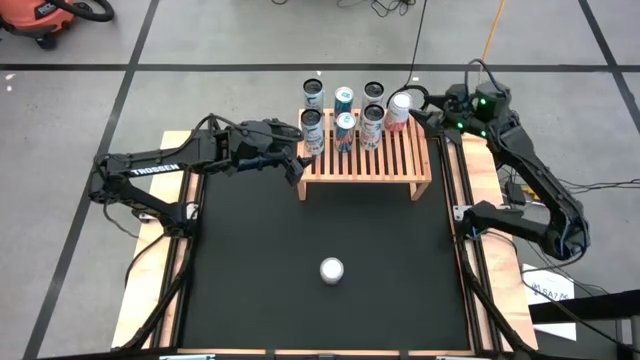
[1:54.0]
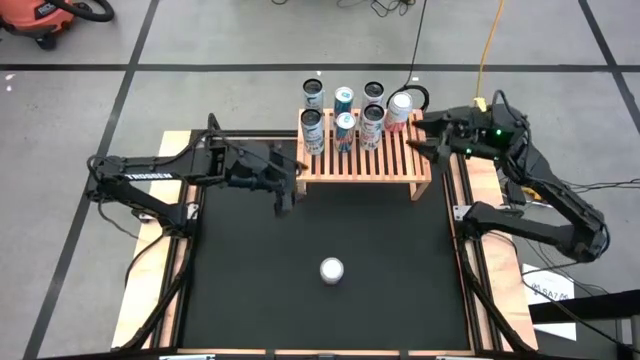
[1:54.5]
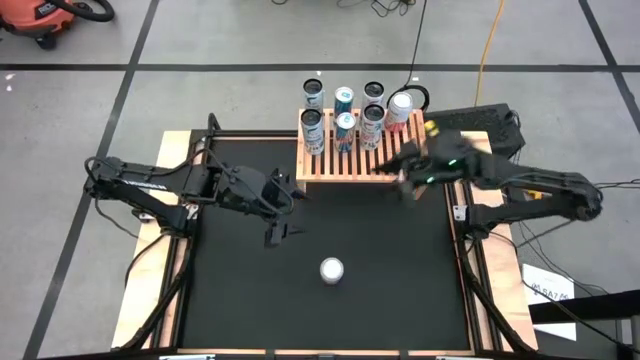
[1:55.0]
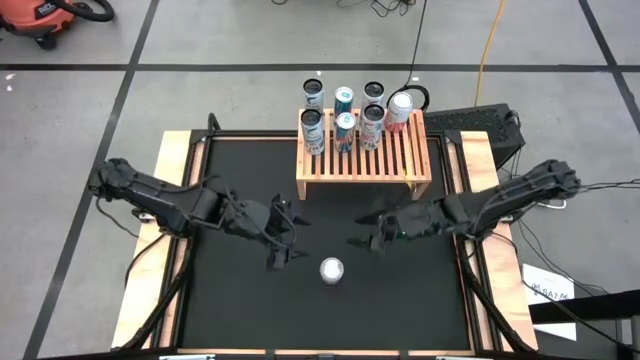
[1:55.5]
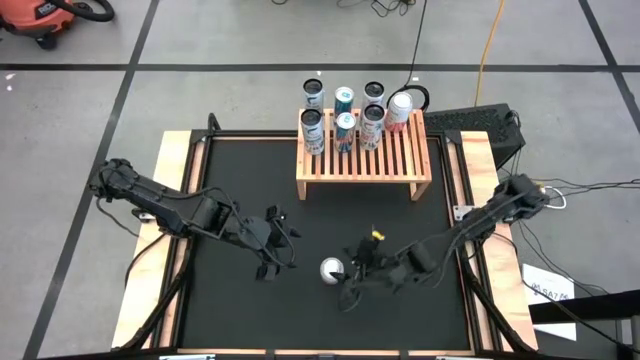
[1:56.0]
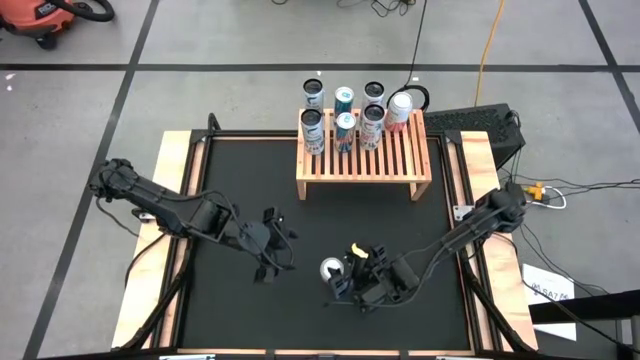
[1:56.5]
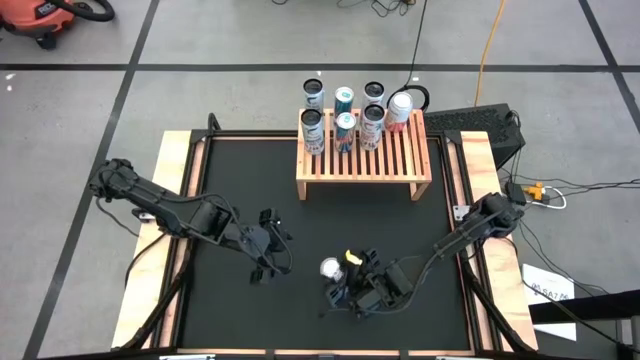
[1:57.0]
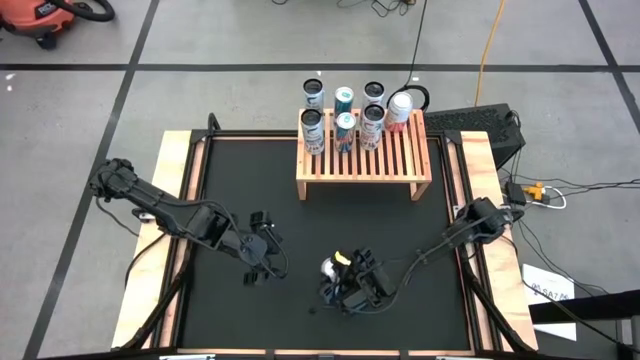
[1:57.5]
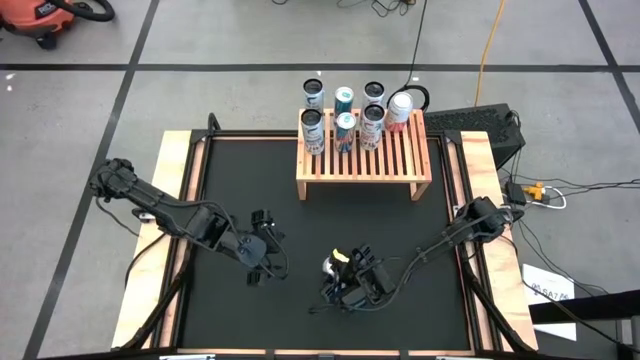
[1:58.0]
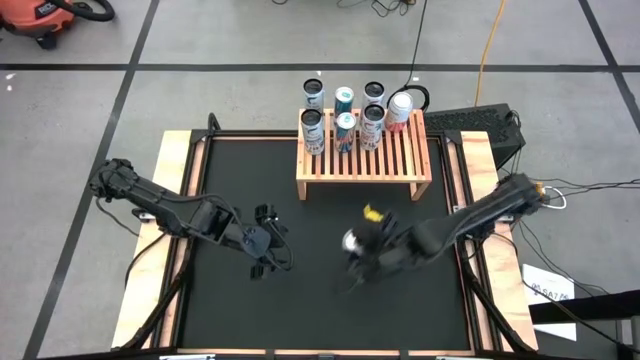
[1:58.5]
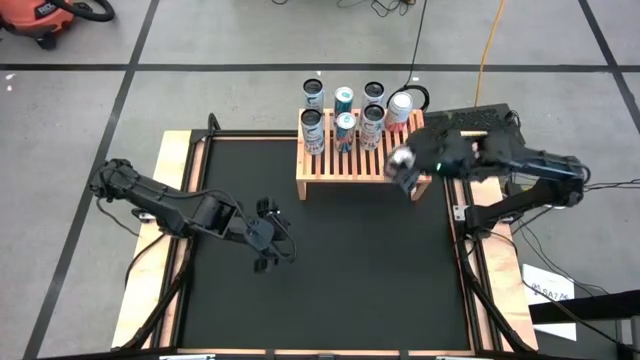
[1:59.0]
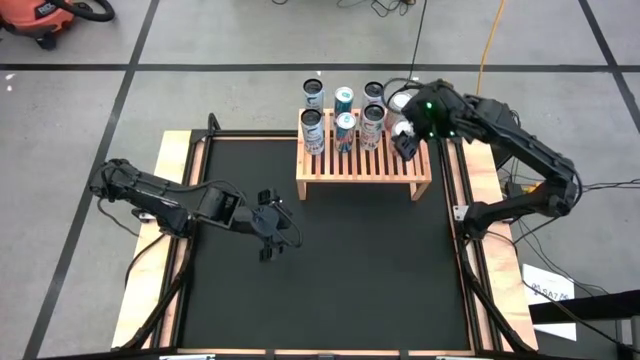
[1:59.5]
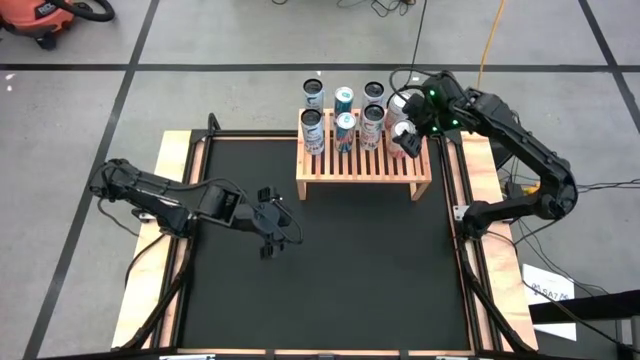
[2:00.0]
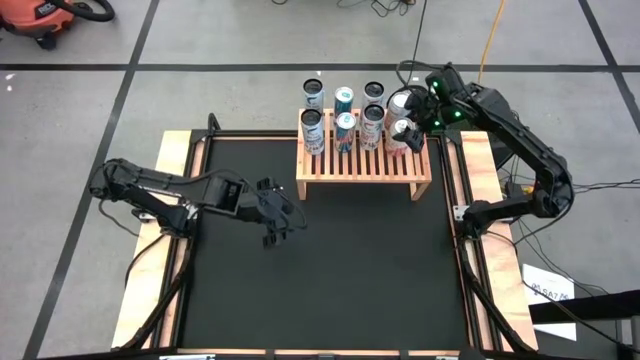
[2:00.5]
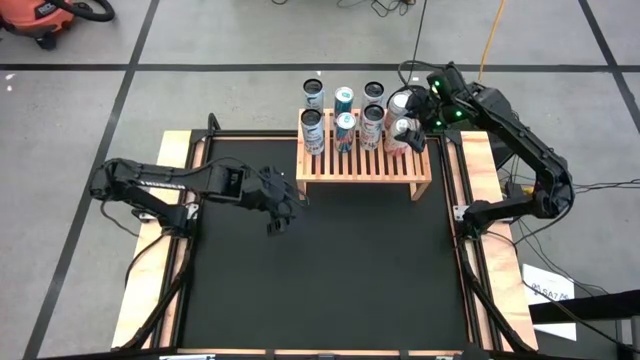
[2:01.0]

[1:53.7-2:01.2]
Task: Place canned beverage on shelf
Put the white soda can on the shelf aligned with the other white soda can

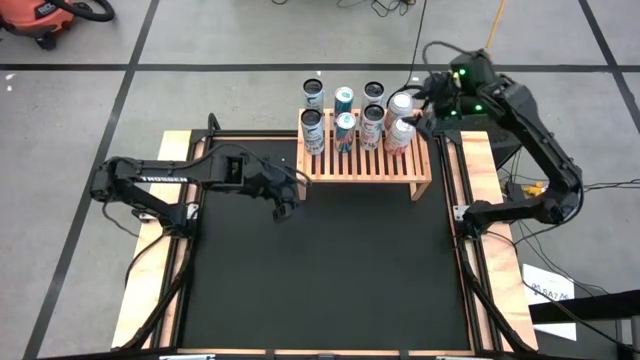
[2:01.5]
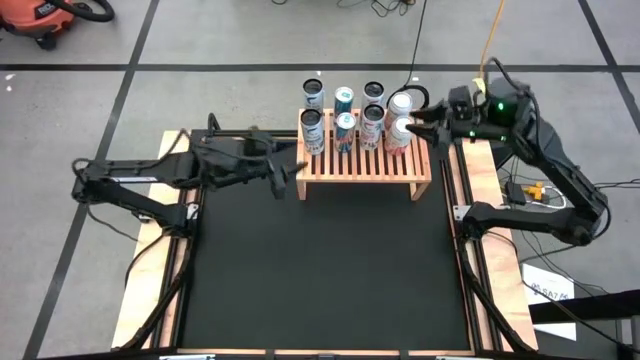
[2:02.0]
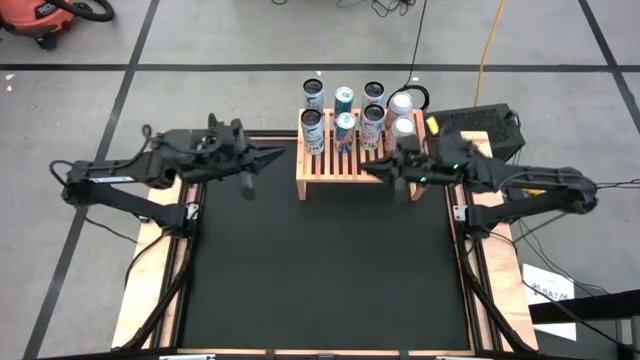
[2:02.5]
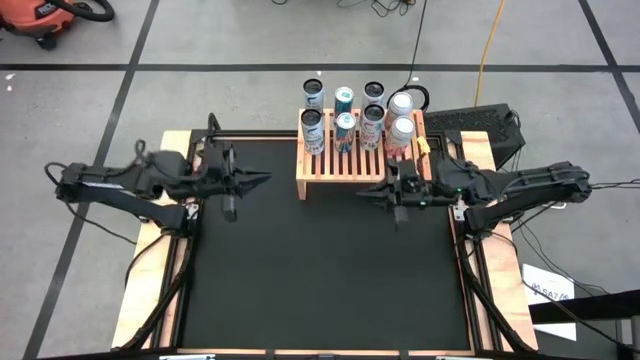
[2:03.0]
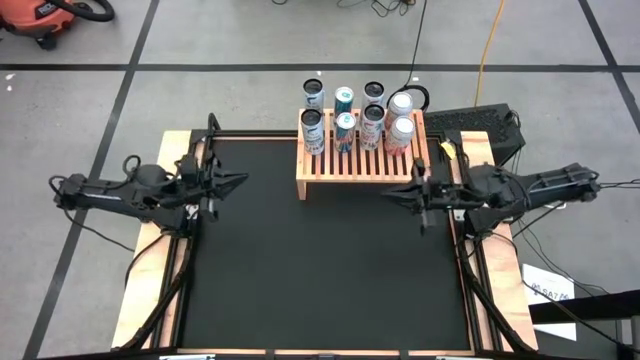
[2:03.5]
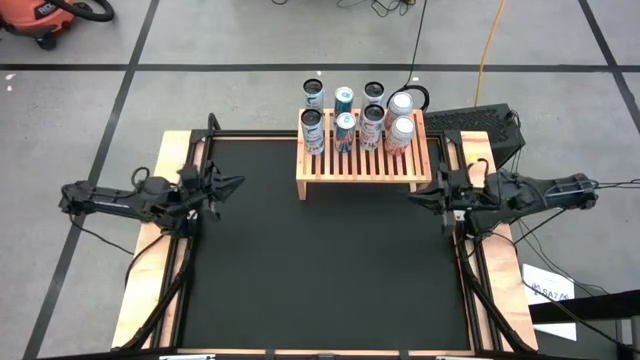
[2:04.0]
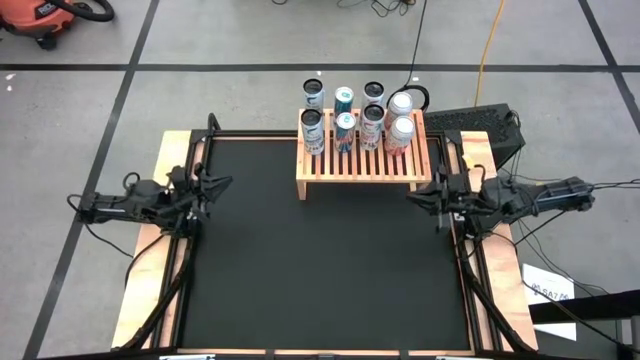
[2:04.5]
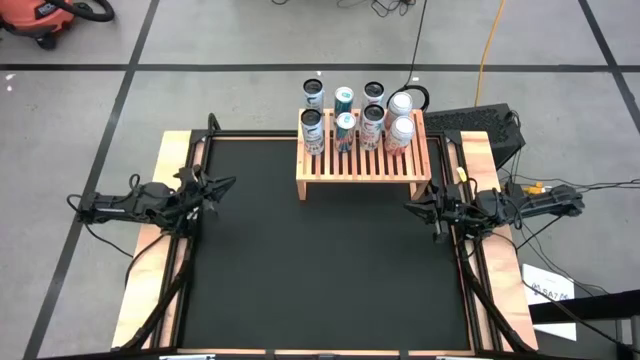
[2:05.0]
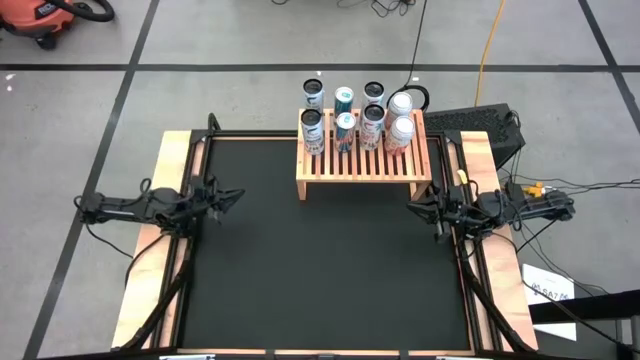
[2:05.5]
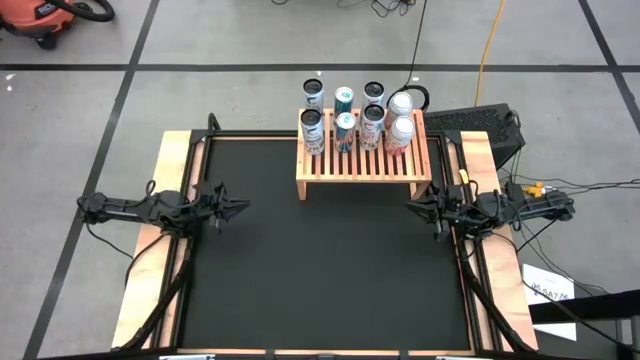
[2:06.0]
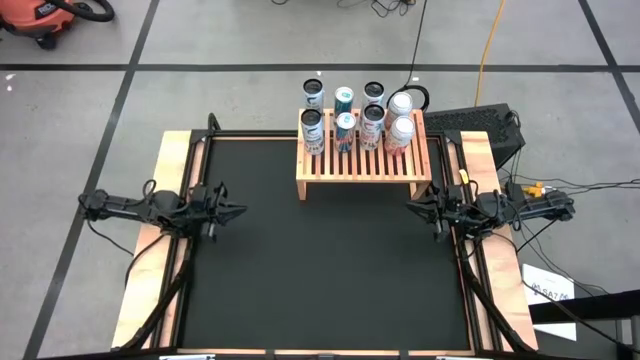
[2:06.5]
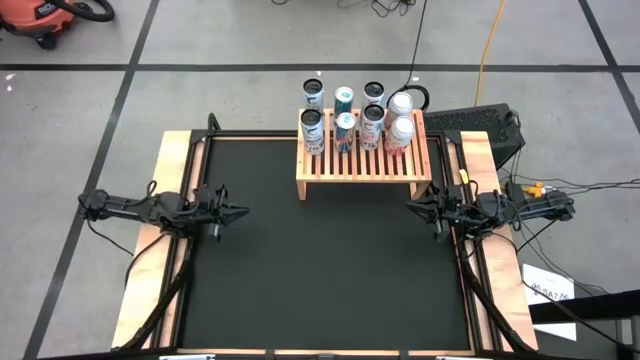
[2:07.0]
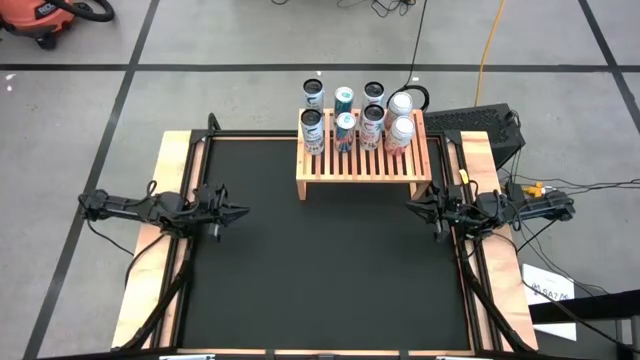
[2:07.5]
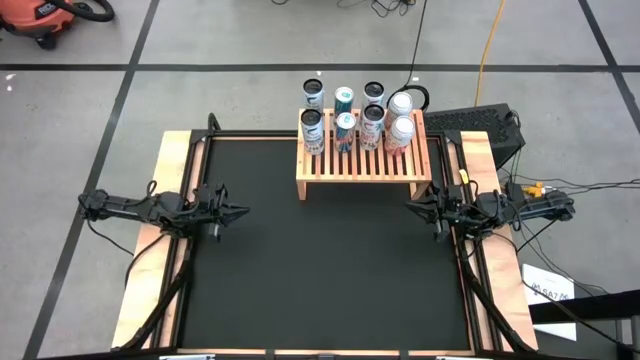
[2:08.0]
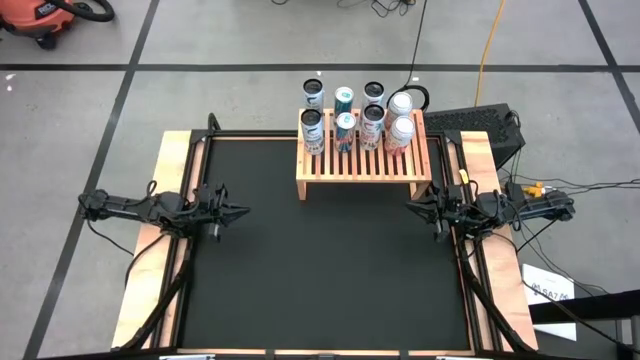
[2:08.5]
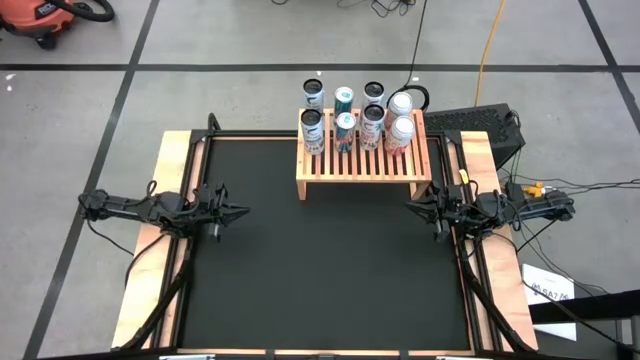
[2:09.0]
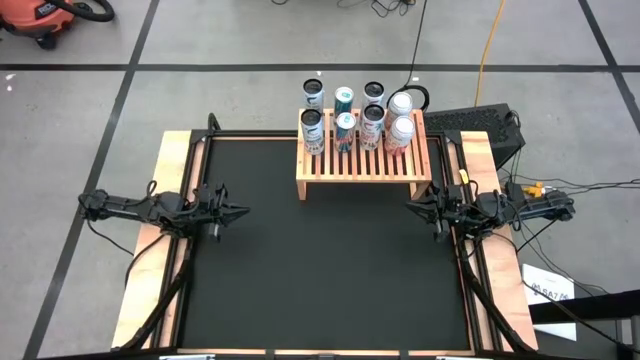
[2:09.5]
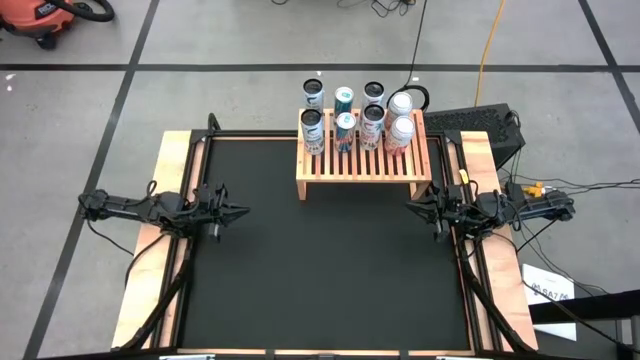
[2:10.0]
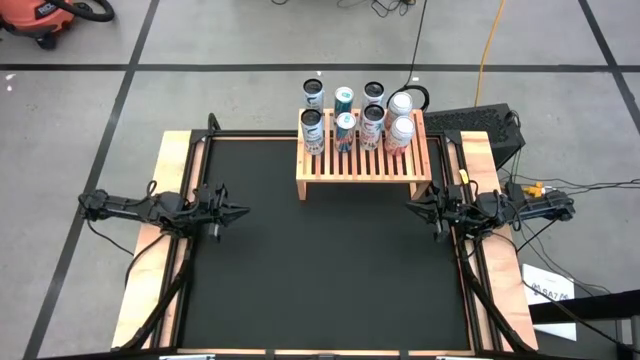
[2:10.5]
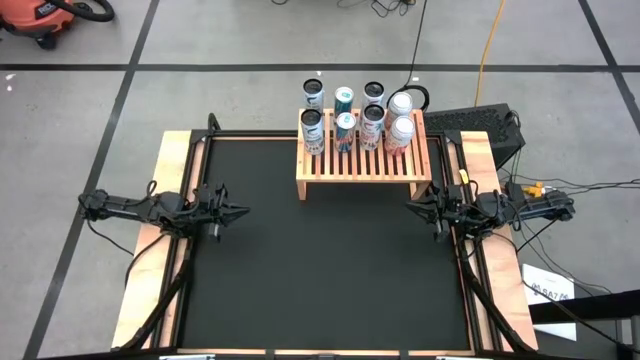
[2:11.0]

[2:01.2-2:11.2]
Return to Home Position
